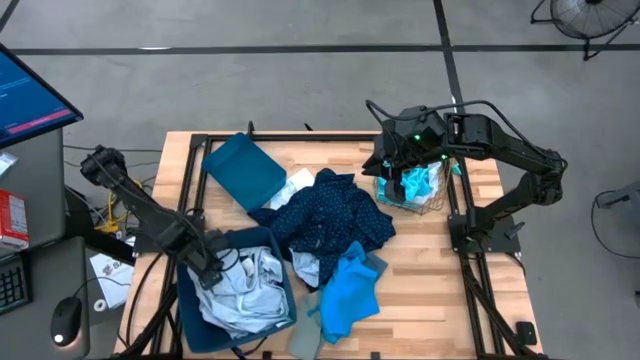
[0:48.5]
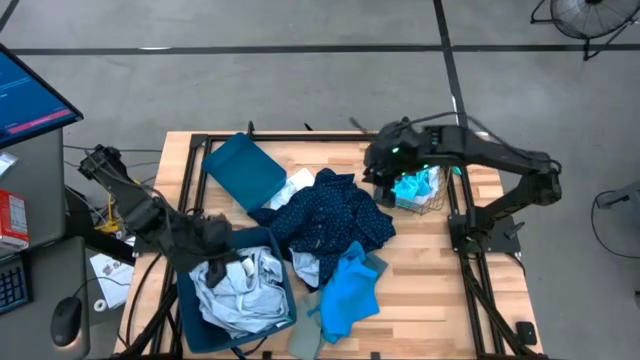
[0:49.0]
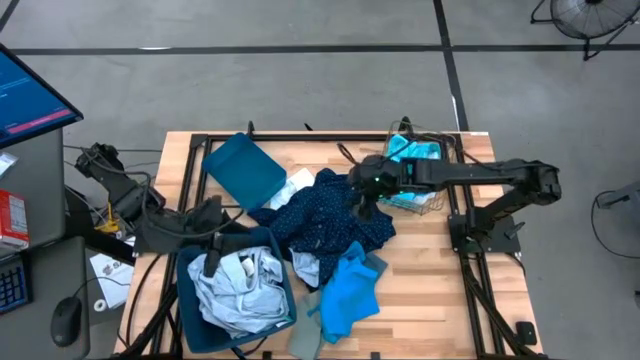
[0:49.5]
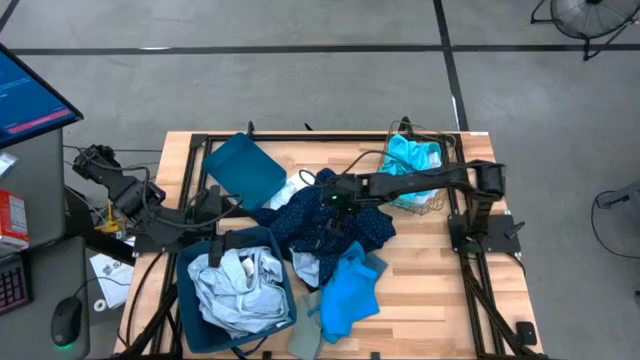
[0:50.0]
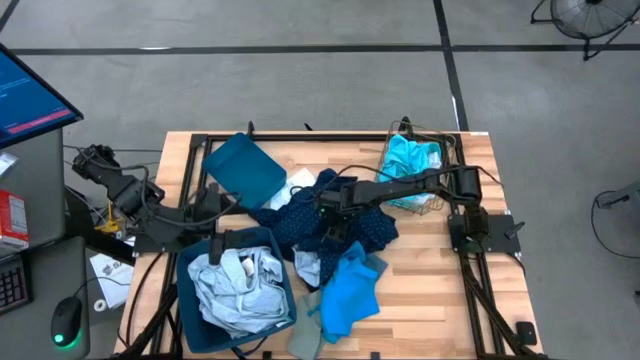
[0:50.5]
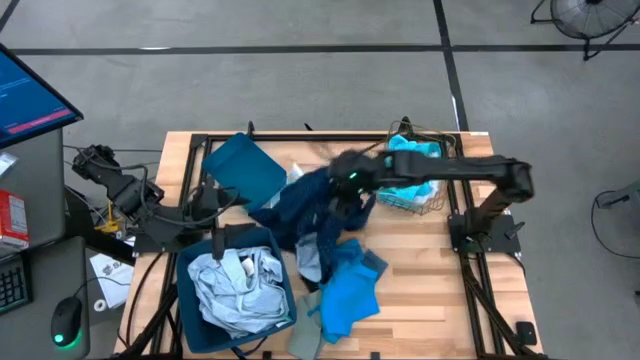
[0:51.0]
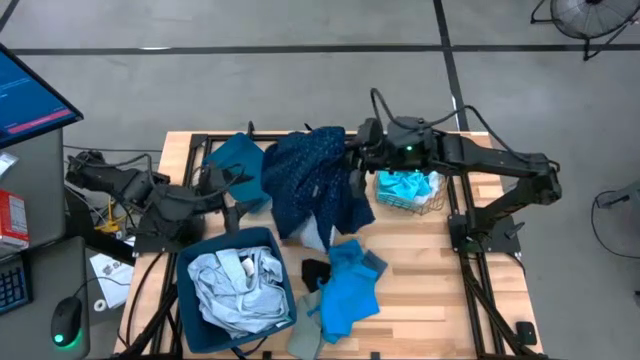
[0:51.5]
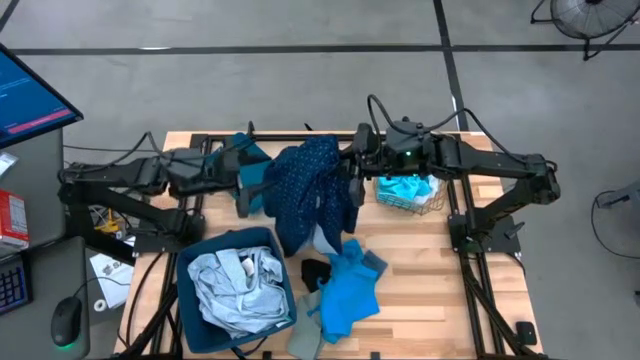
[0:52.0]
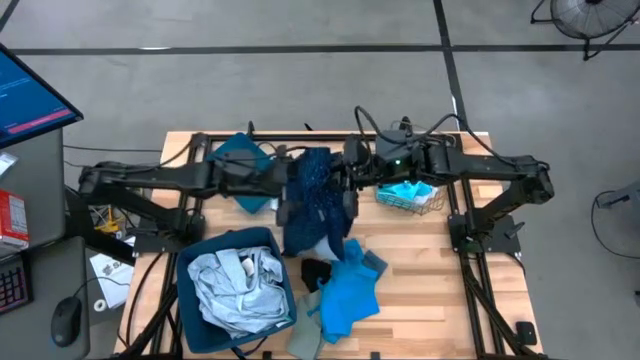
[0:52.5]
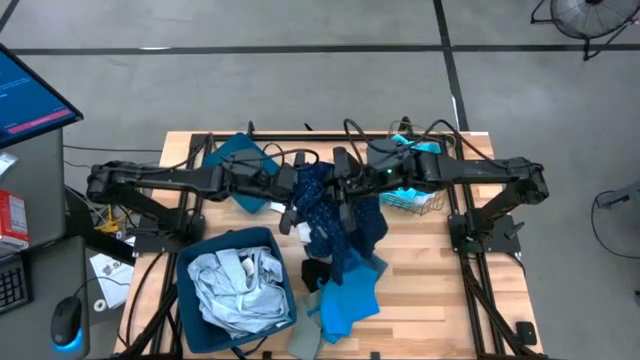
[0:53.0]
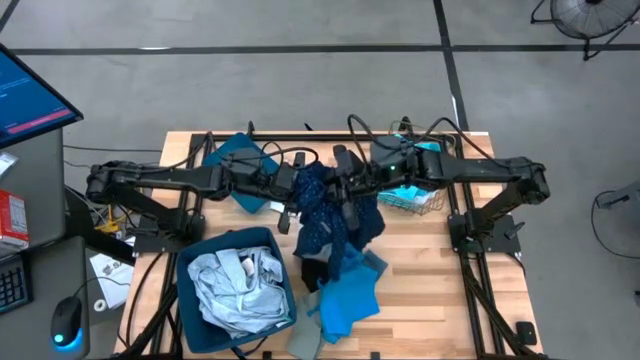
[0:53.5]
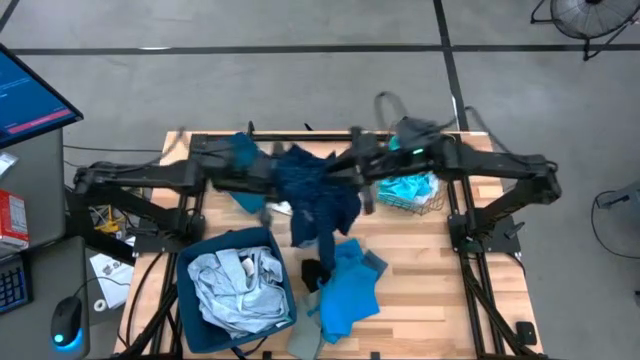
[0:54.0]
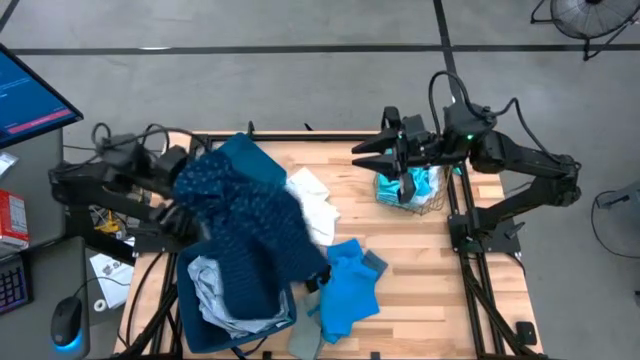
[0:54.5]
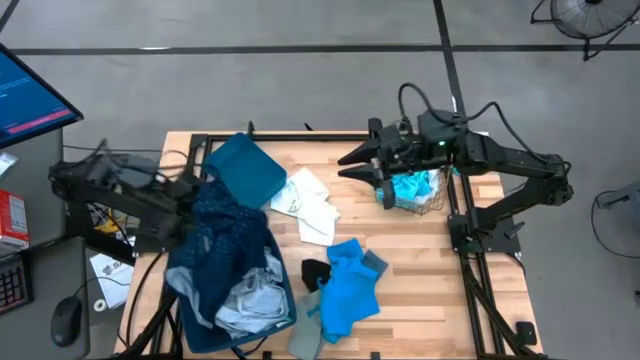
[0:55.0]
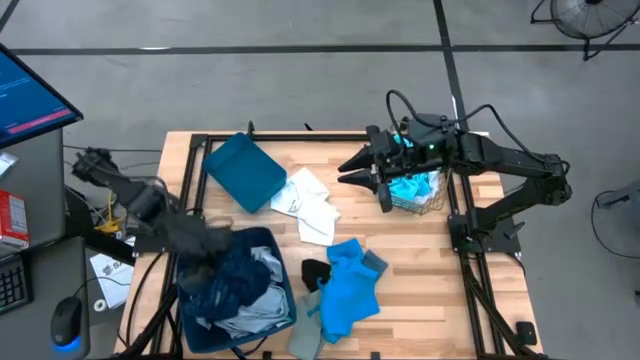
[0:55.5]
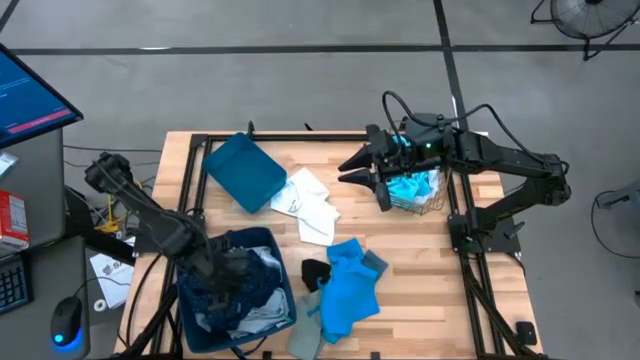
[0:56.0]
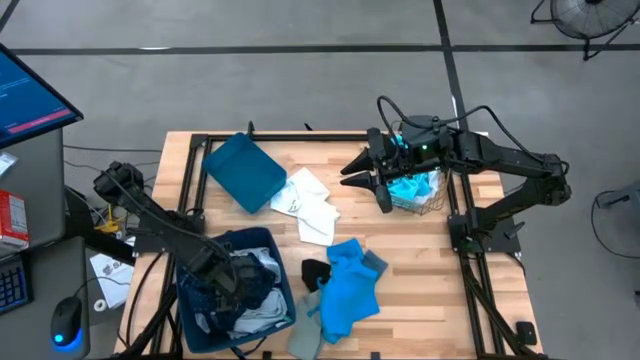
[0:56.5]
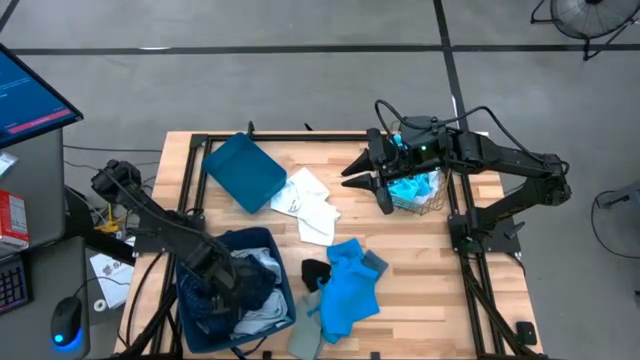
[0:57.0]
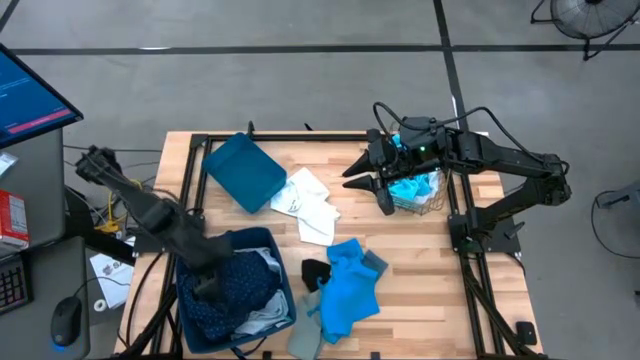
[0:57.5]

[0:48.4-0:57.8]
Task: Pick & Place Cloths
Put the blue patterned shirt into the blue basket

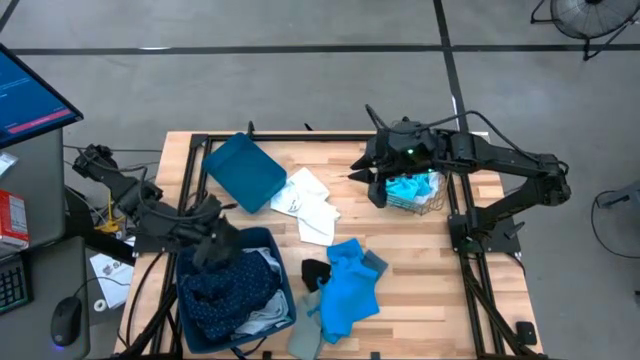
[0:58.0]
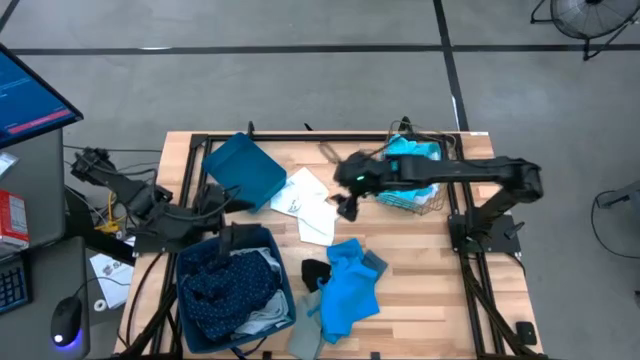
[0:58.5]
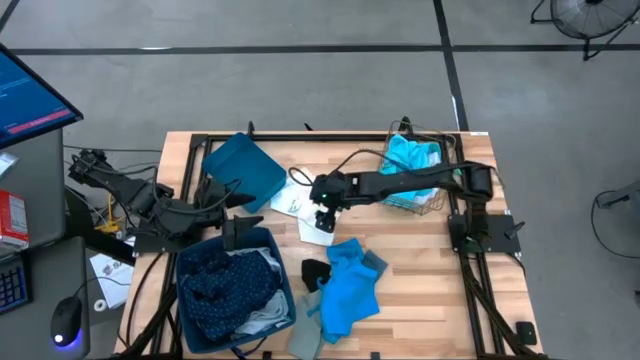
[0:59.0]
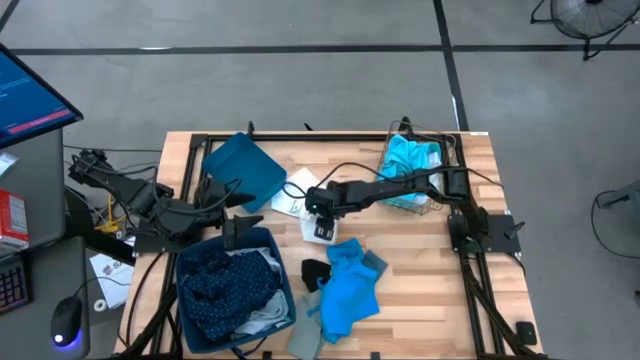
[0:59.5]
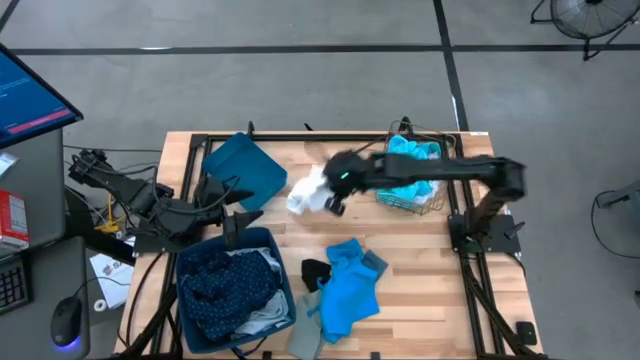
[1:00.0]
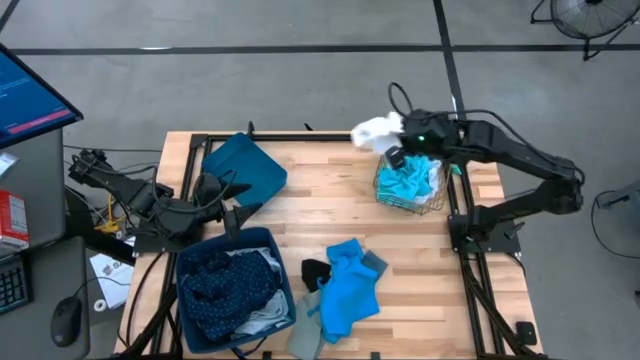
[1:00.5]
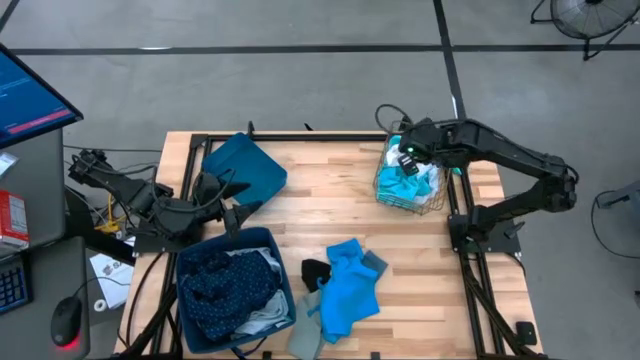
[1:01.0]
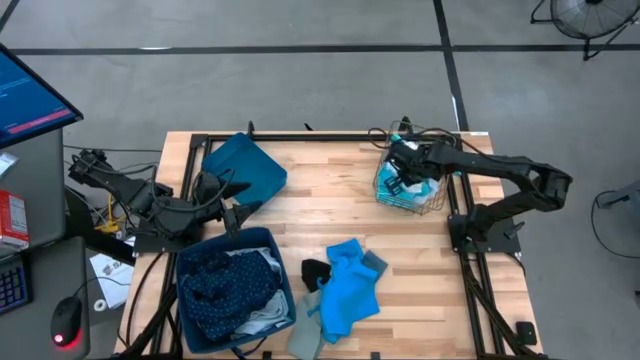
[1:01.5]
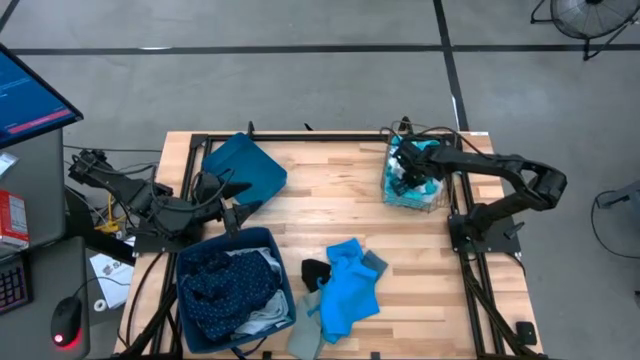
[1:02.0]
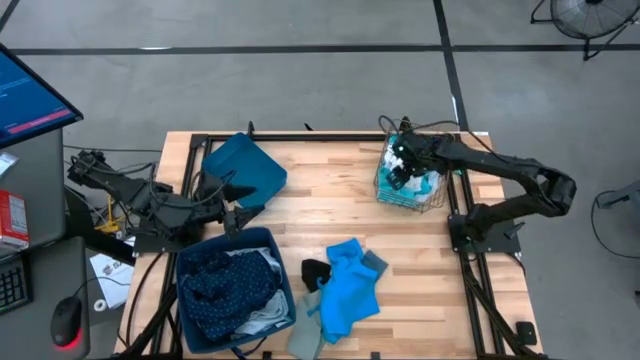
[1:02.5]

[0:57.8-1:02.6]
Put the white shorts into the wire basket

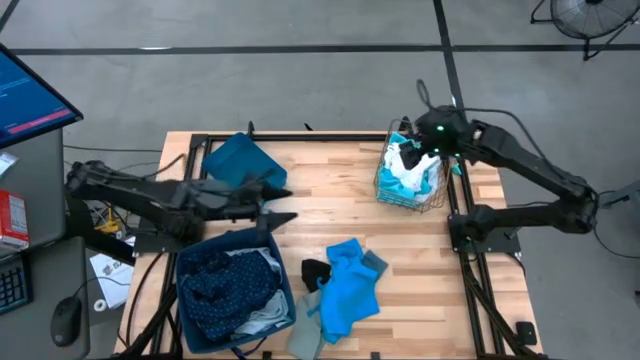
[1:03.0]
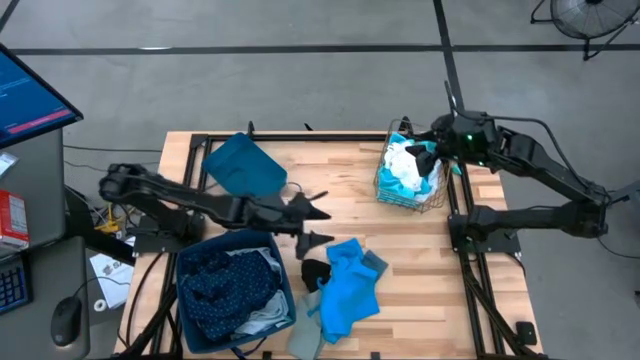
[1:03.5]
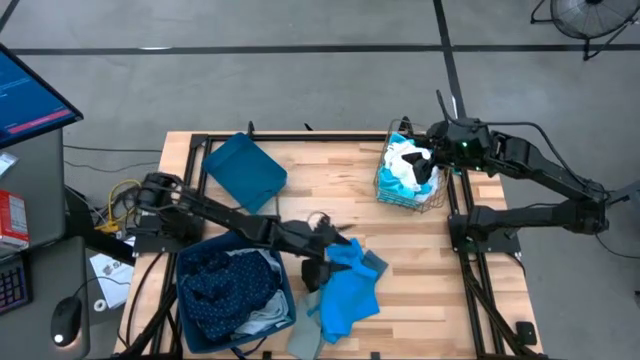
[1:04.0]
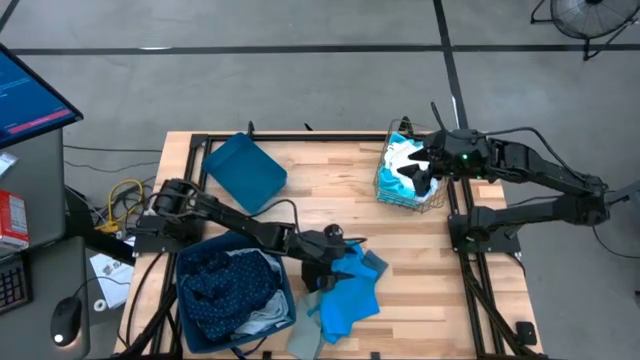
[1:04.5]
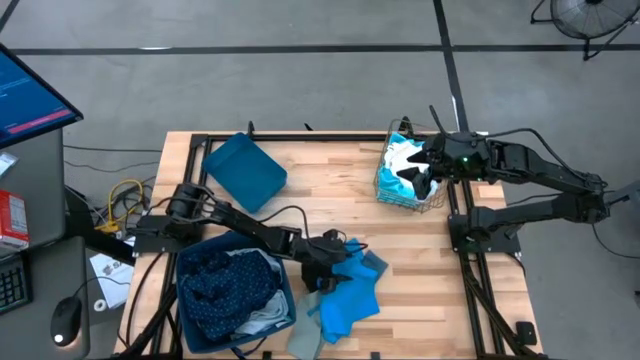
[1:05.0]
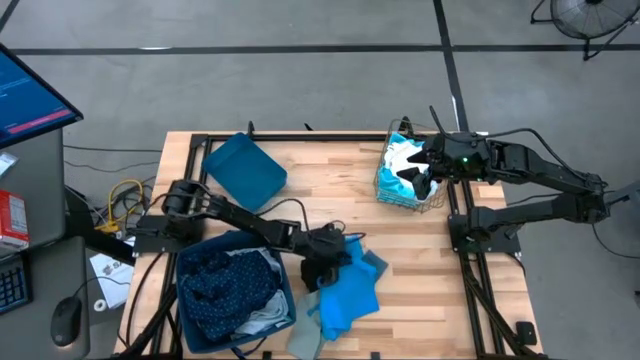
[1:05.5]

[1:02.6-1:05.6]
Put the blue shorts into the wire basket

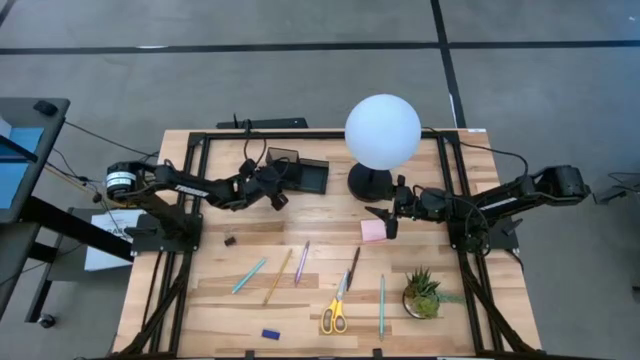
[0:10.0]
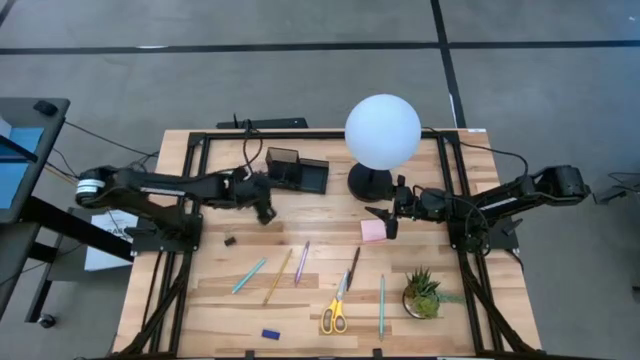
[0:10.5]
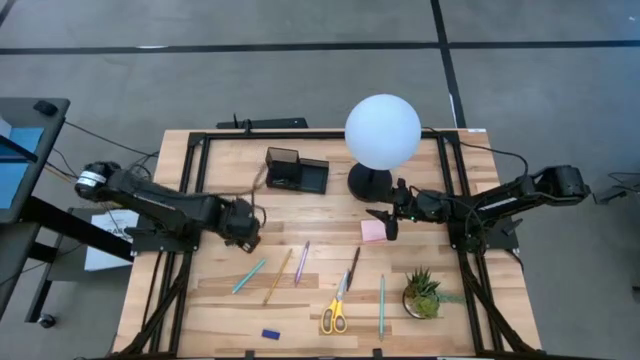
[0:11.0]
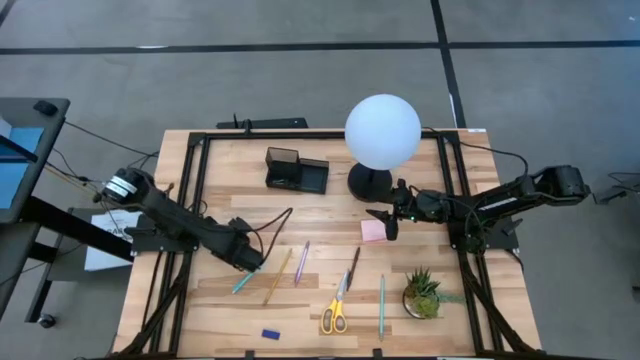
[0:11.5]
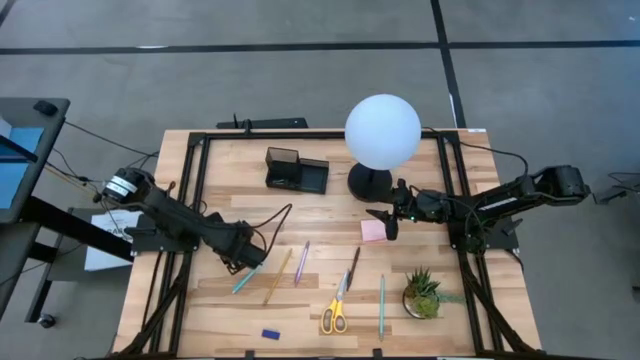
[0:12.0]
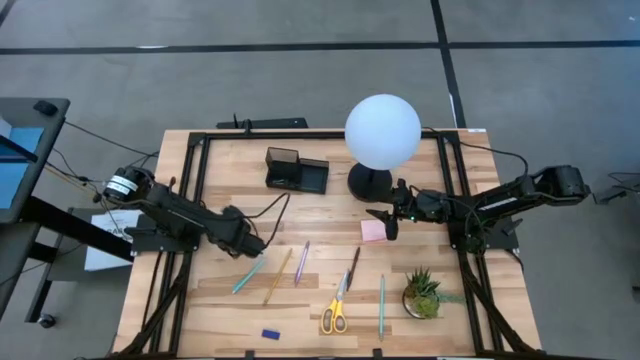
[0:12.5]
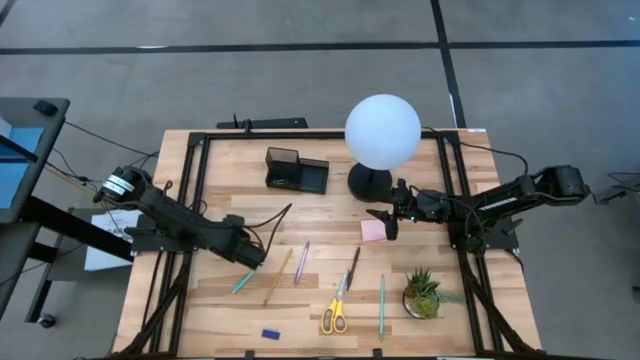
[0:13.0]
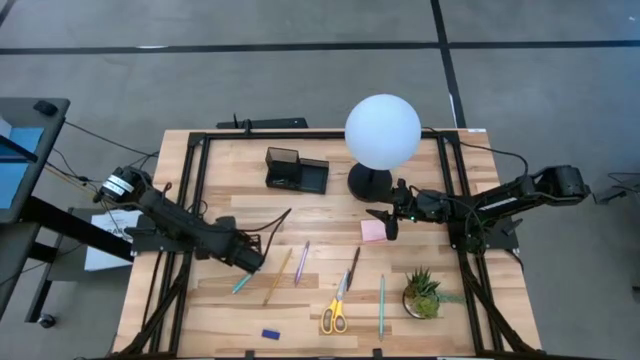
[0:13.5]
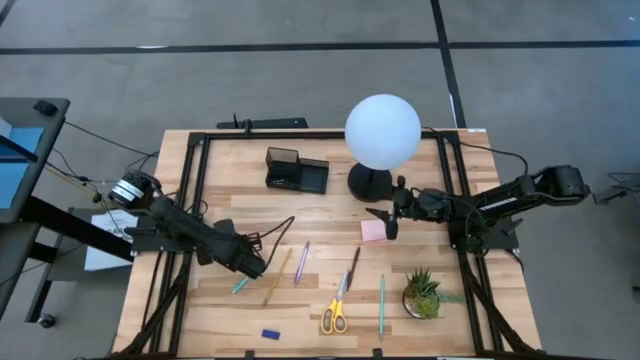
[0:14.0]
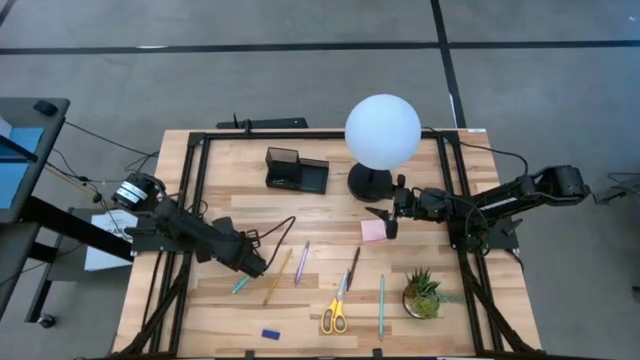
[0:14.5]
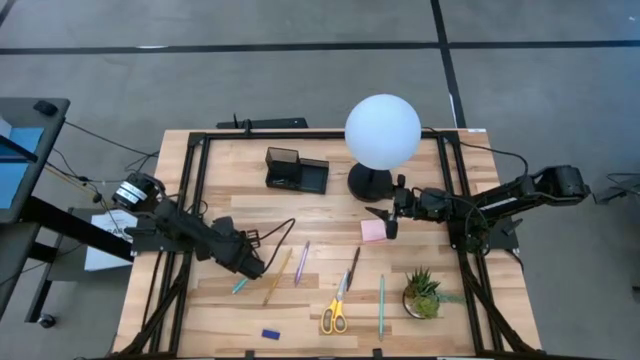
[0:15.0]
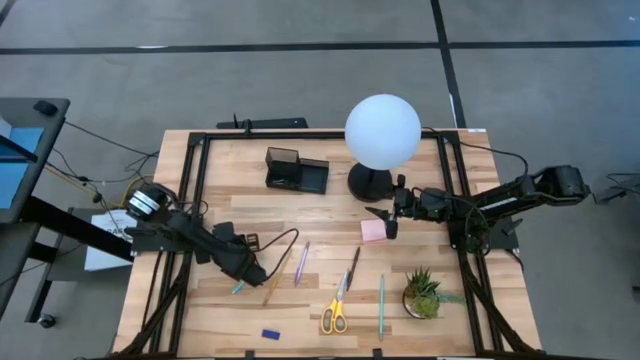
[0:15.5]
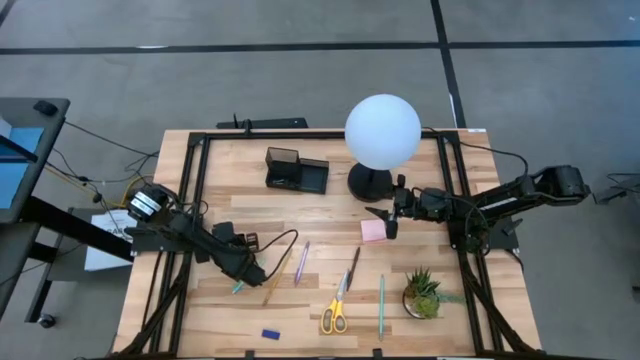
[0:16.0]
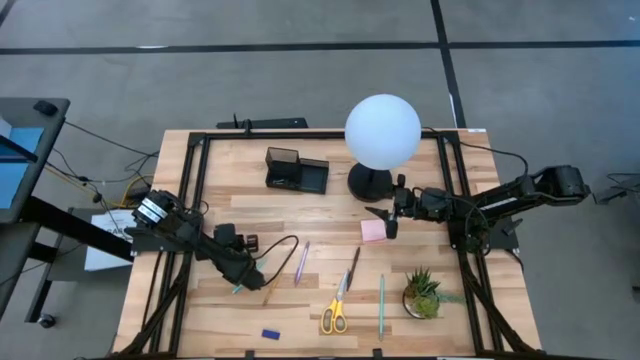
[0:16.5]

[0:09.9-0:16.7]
Task: Pick and place office supplies into organizer
Put the black binder clip into the black desk organizer
